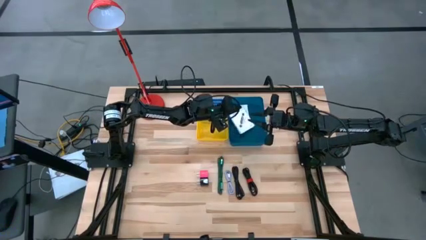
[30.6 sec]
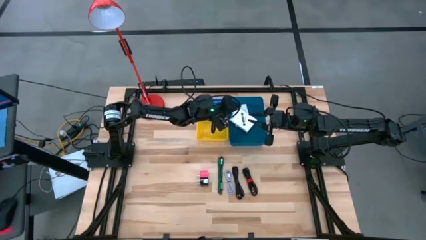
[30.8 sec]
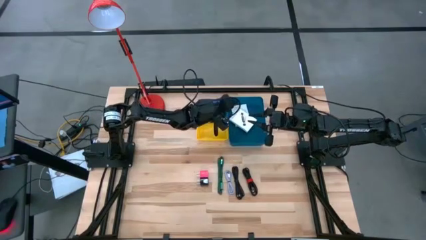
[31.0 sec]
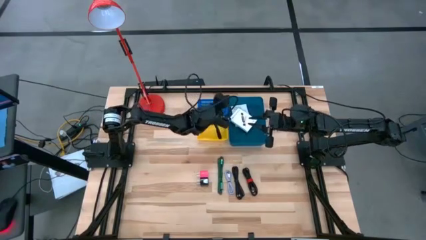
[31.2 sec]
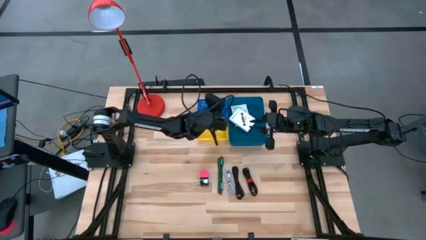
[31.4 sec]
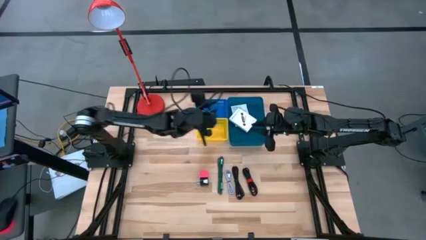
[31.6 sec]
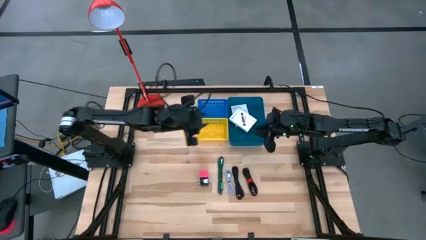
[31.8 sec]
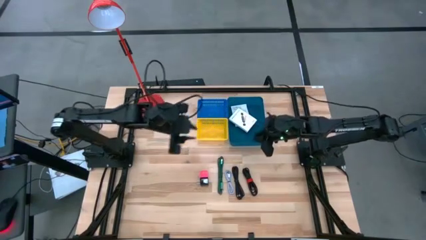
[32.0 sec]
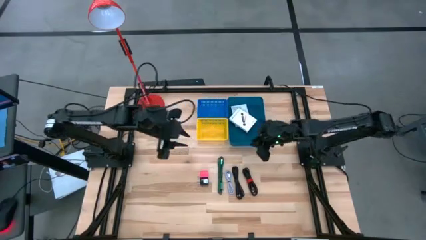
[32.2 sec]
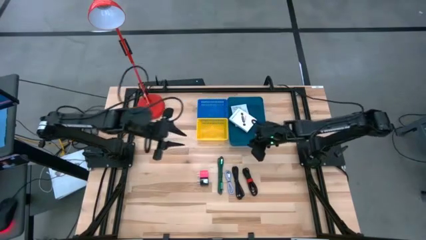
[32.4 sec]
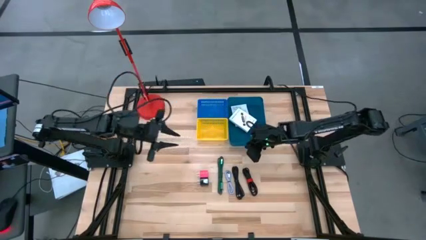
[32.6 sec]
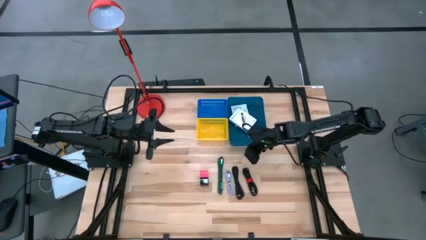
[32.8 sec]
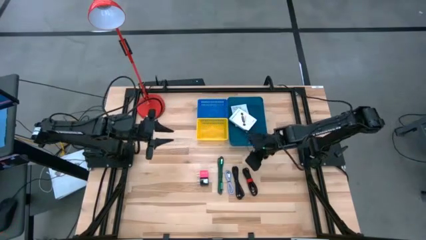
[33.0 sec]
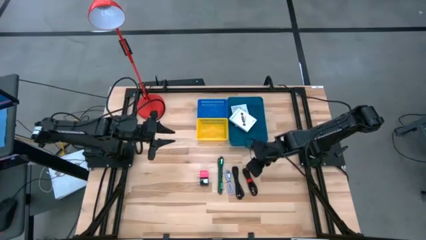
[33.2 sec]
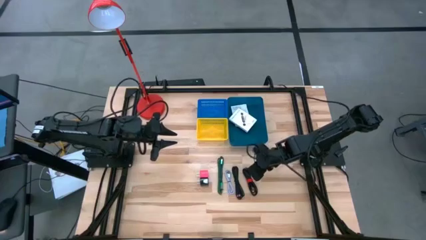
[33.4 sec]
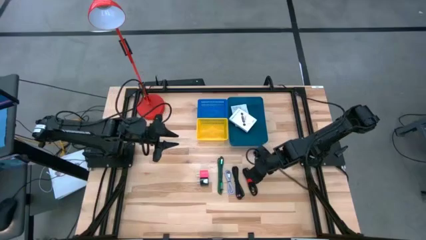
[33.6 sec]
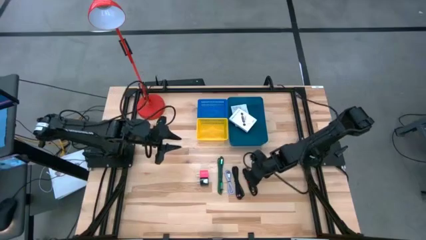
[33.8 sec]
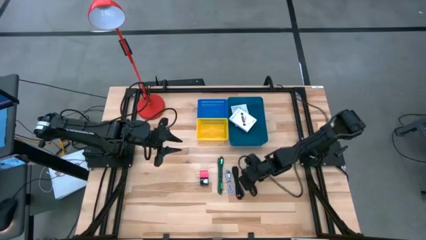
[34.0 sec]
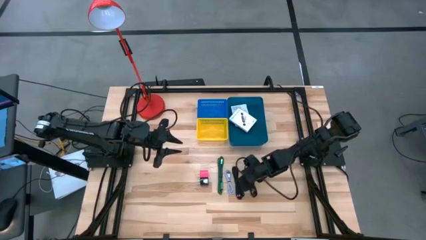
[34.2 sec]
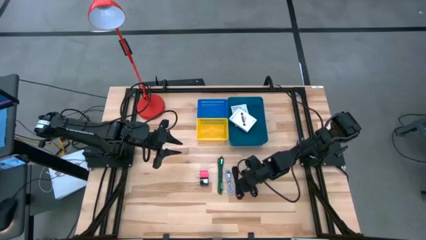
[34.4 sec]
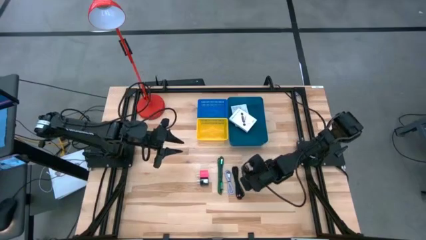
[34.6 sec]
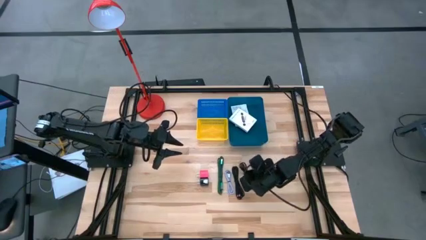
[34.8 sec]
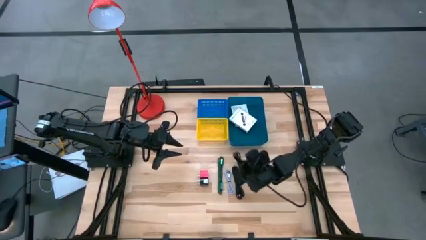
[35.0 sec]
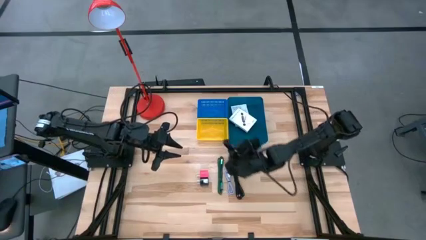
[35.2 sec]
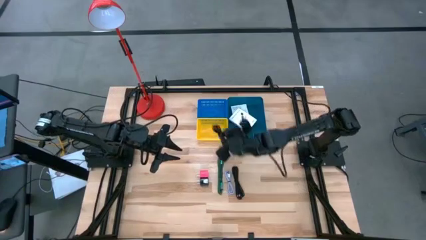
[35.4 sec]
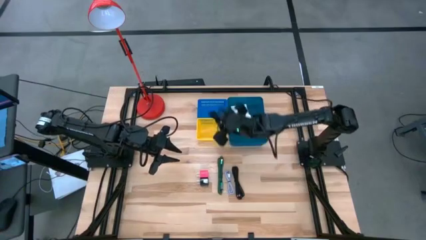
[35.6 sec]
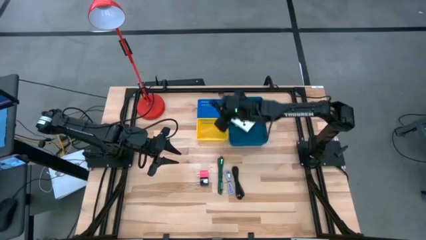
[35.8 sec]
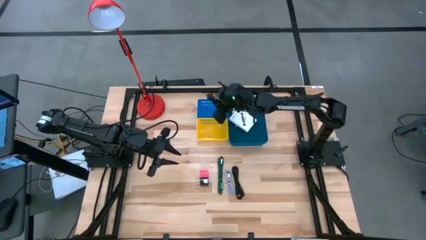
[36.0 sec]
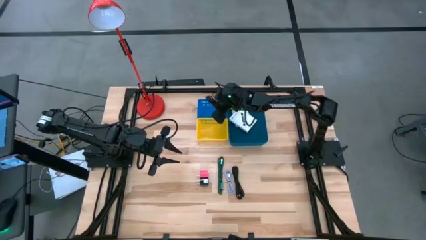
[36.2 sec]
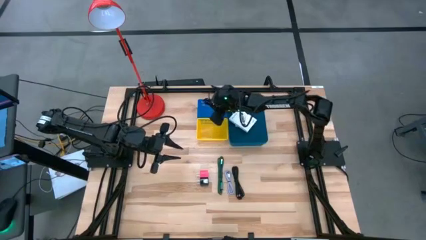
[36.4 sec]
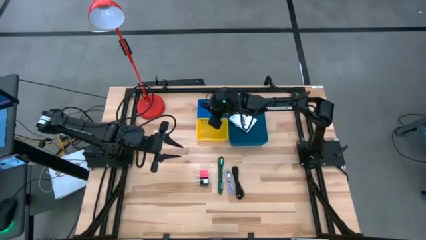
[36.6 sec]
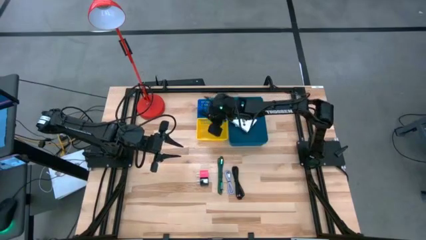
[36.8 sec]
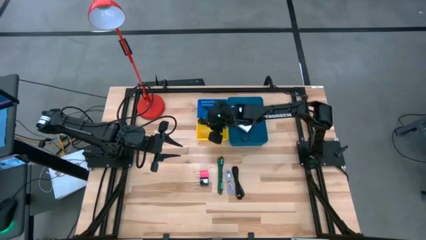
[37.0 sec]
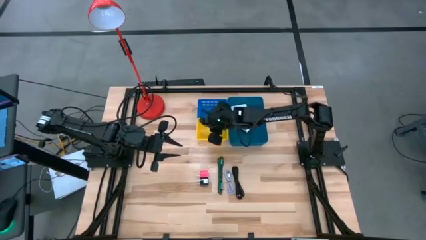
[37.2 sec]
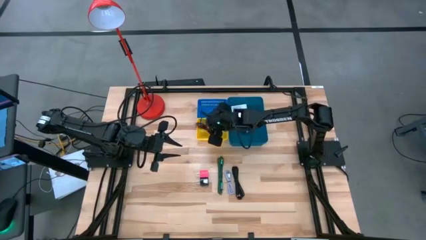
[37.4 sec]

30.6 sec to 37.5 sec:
Task: Pick and place items into bin
Put the right black charger cable into the yellow bin

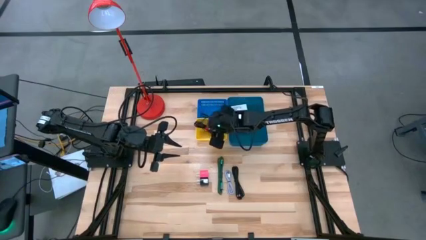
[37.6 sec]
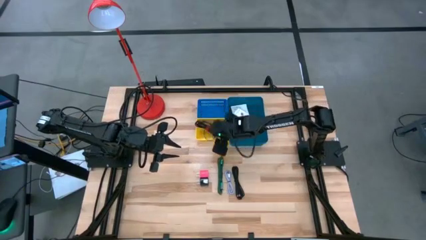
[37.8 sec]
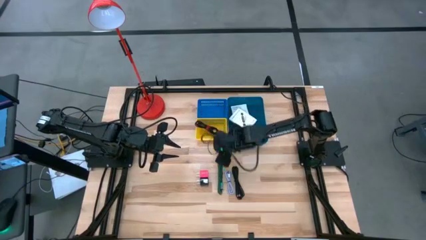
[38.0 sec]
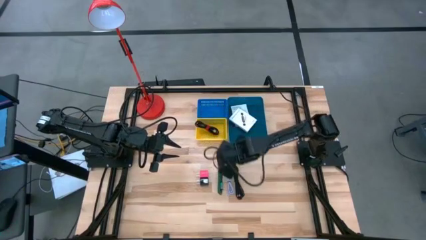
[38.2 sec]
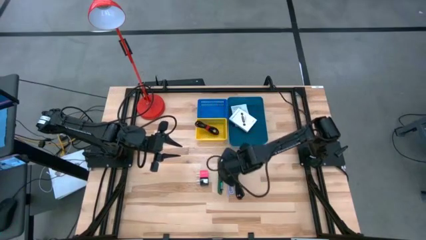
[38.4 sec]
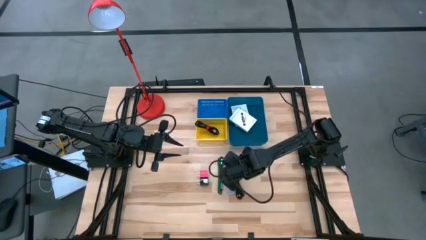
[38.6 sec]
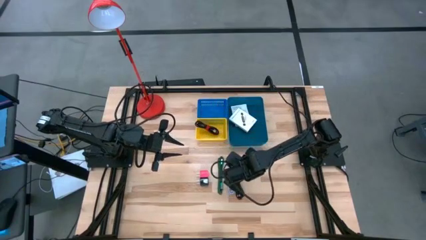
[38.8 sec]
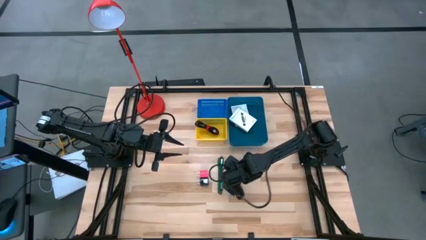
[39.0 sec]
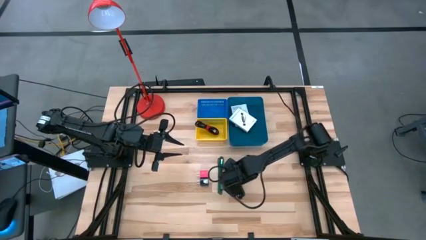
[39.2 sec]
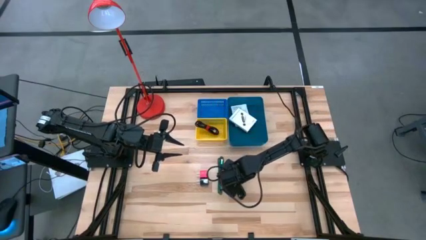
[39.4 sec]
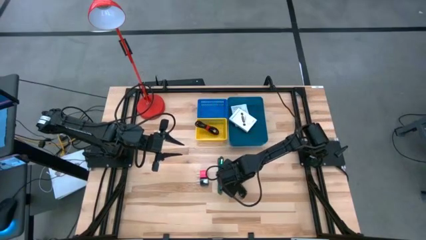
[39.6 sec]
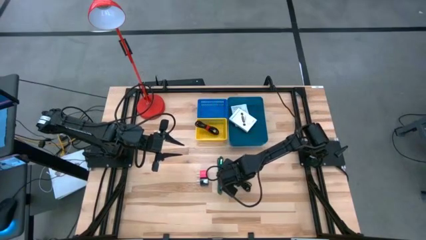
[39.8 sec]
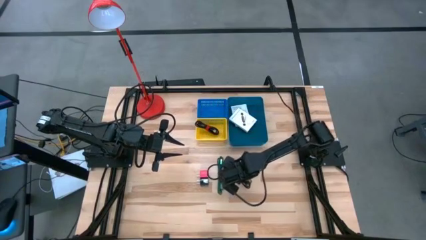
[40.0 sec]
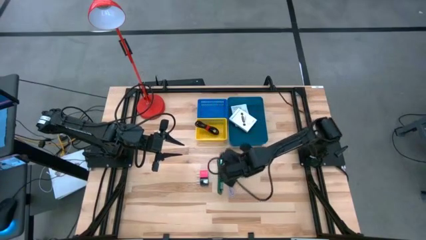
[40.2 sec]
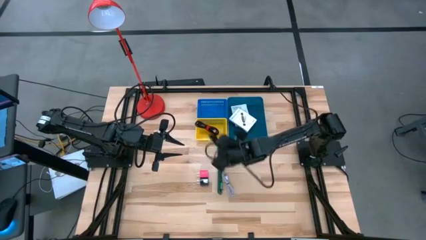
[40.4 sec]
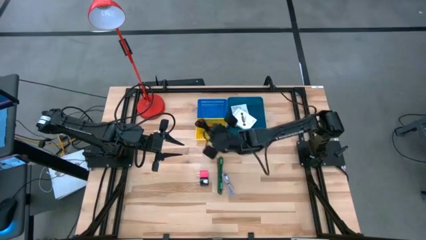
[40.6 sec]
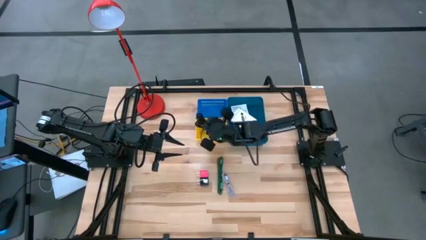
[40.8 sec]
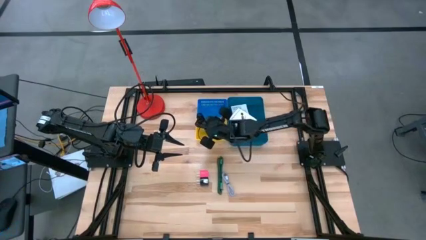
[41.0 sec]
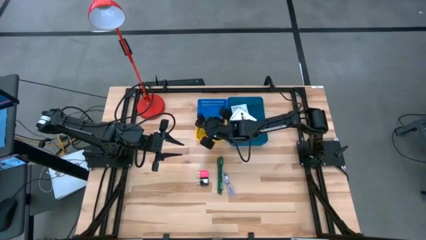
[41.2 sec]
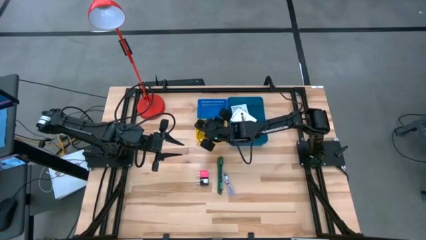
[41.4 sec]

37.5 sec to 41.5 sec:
Put the black charger cable into the yellow bin

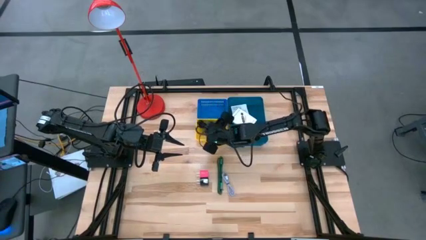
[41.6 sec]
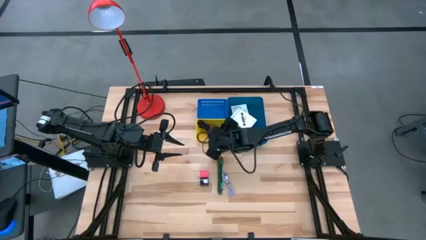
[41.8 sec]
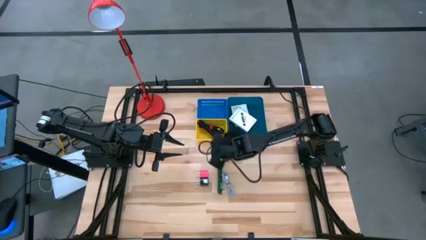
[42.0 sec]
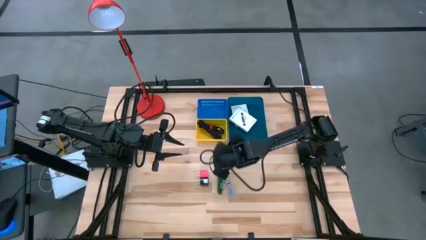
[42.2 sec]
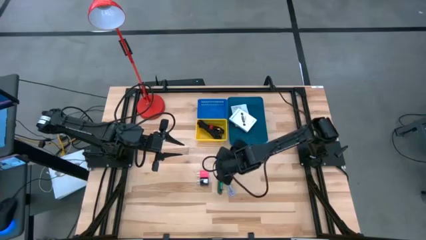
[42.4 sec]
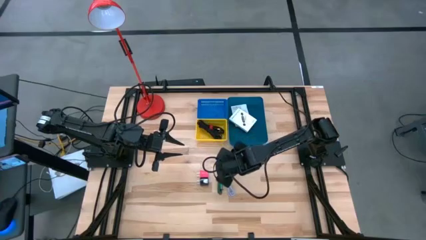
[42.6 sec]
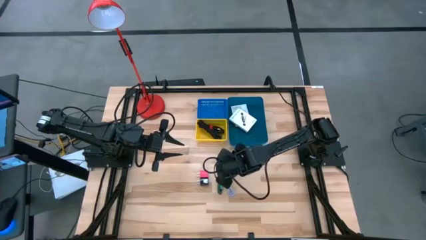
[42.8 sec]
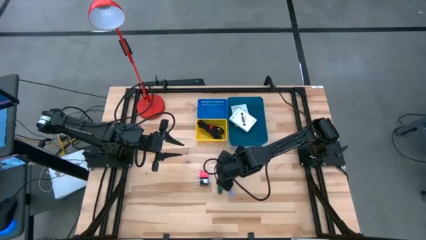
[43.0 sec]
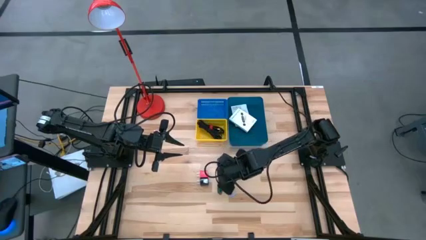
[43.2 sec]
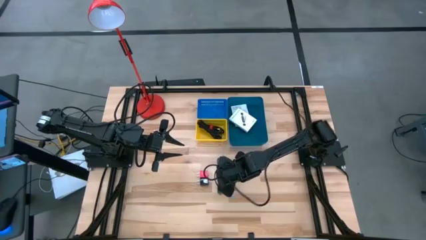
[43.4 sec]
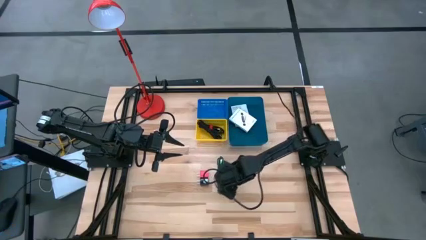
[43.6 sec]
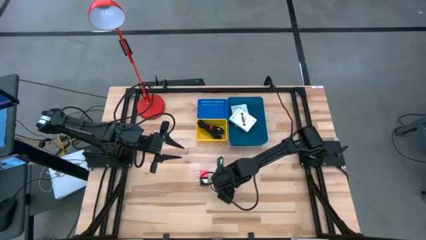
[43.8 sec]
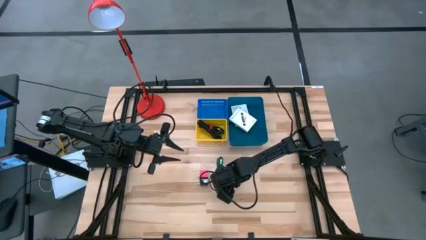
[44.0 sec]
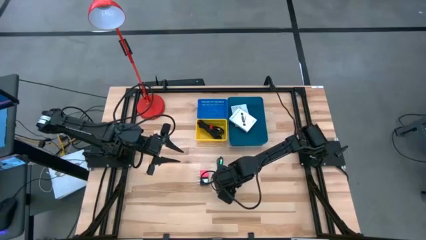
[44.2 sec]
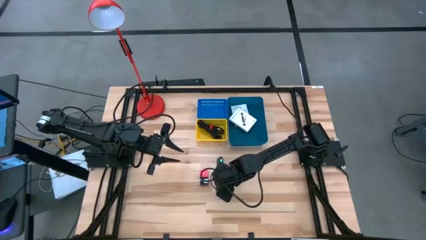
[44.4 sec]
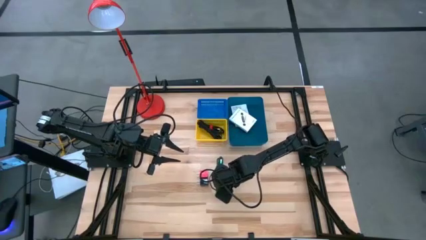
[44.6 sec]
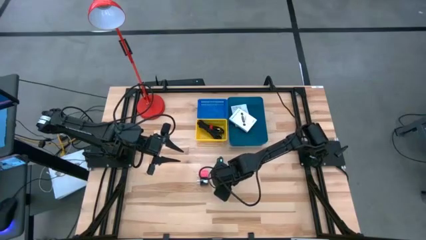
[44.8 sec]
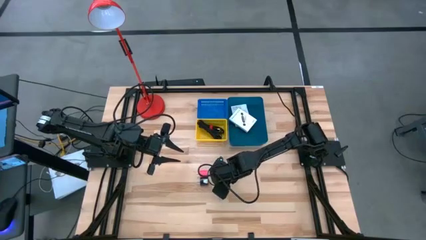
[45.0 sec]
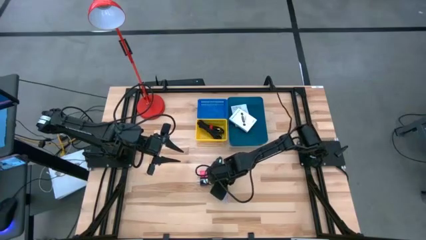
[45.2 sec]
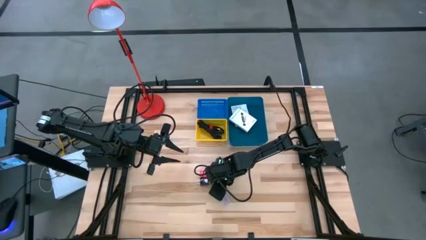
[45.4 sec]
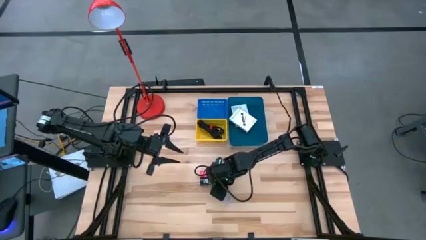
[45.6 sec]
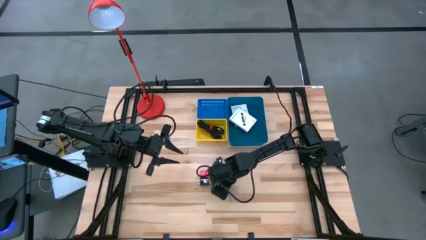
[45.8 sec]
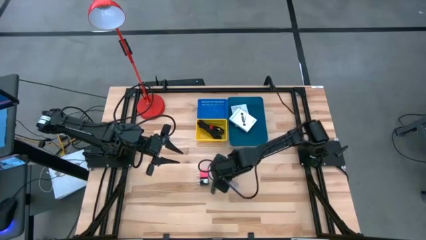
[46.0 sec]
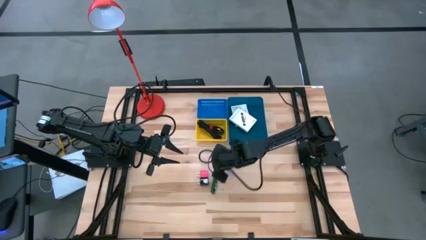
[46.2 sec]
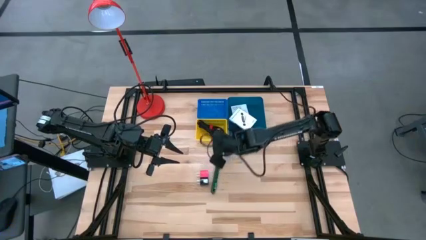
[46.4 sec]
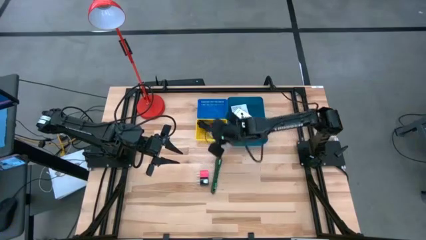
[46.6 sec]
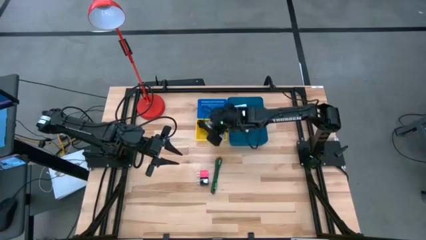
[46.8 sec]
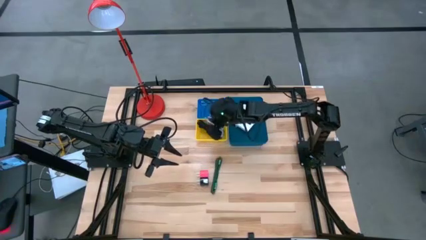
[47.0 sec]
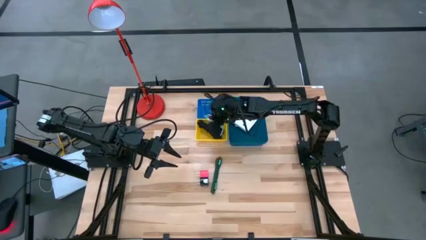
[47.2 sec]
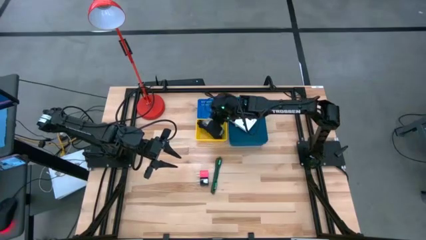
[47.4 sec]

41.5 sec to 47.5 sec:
Put the white charger cable into the yellow bin
